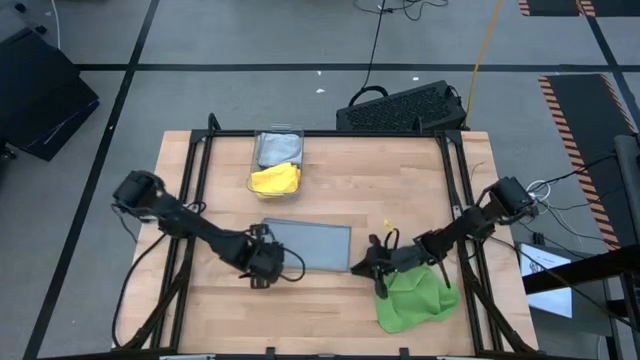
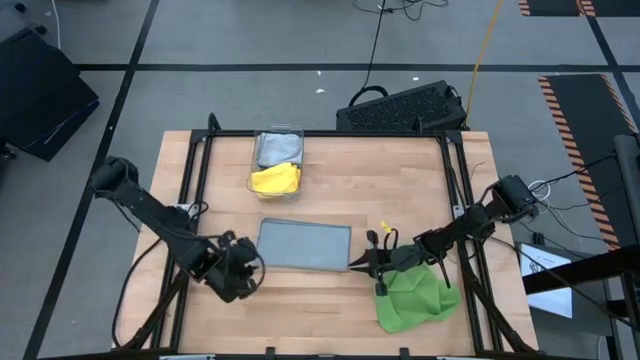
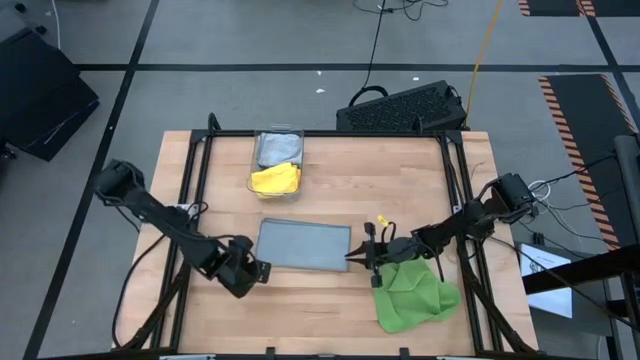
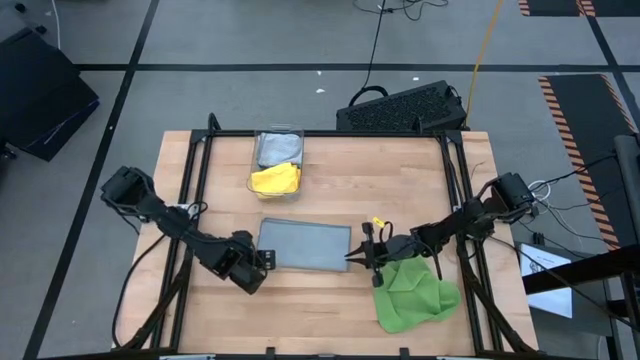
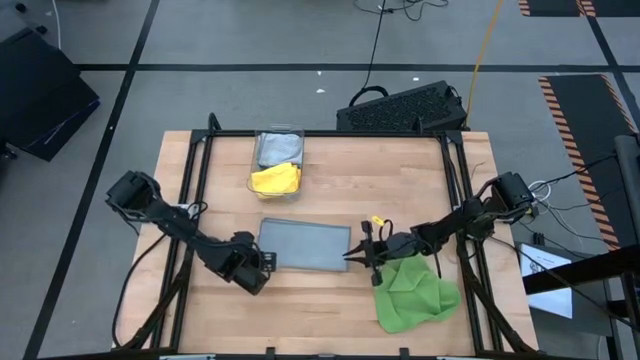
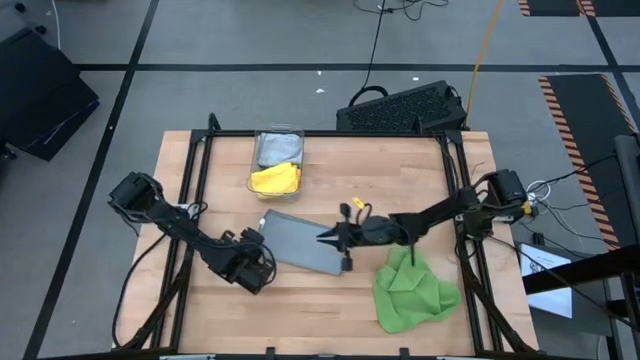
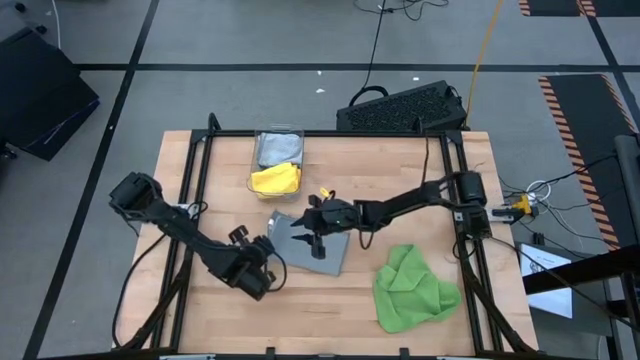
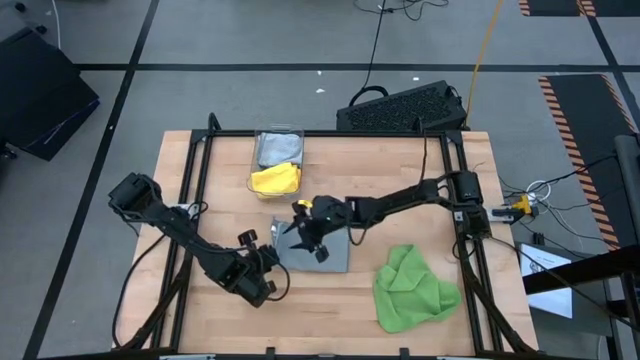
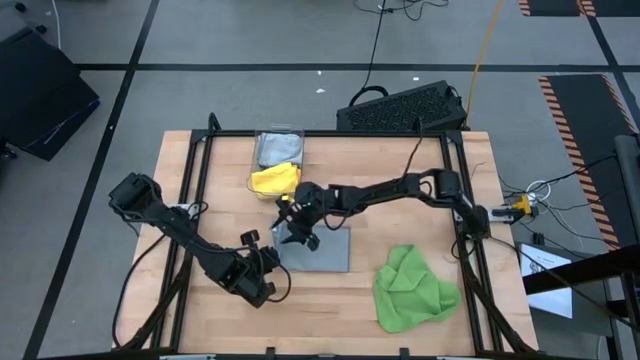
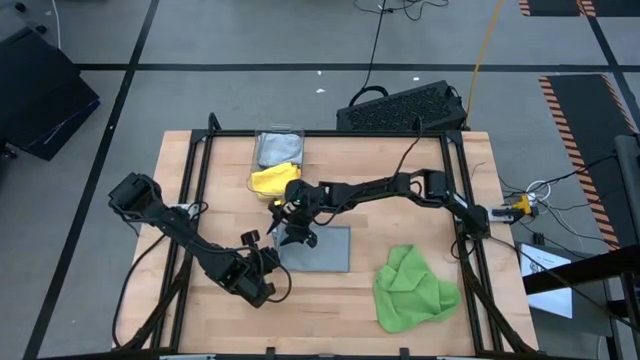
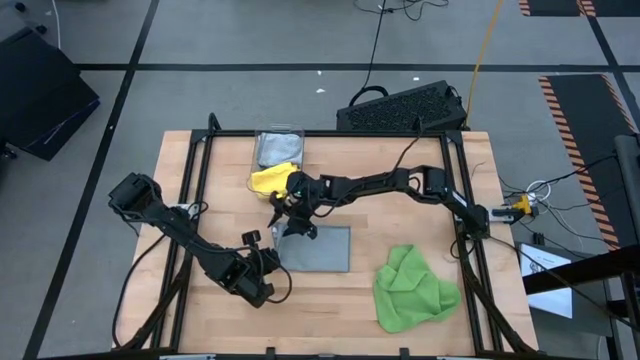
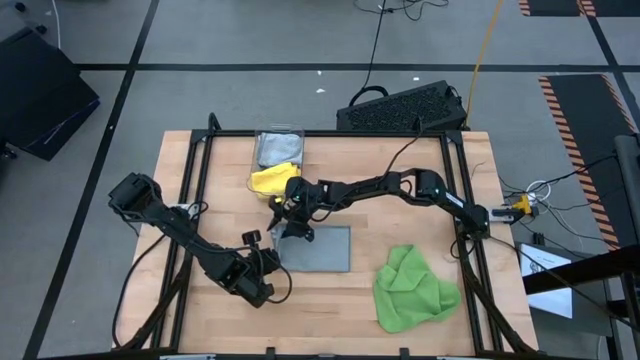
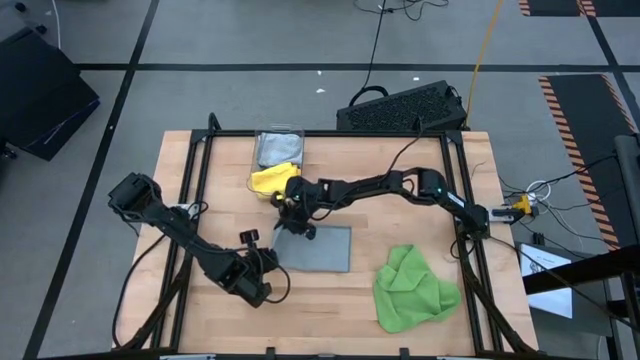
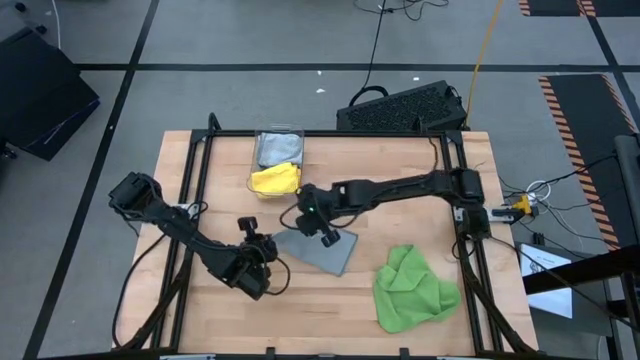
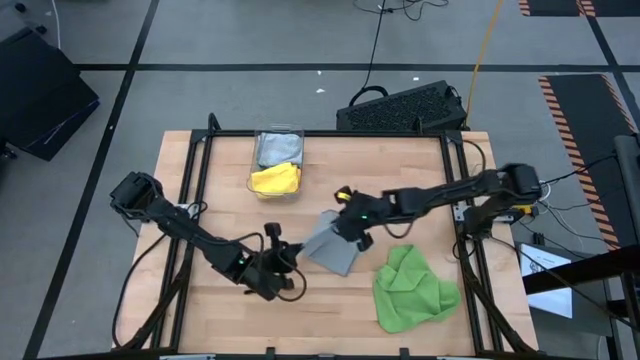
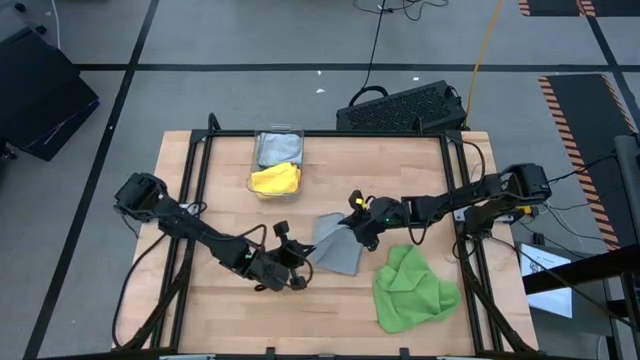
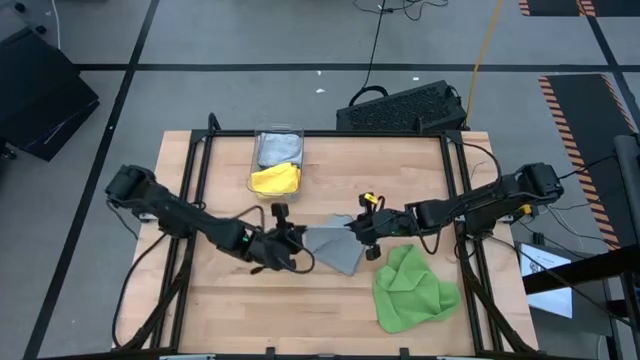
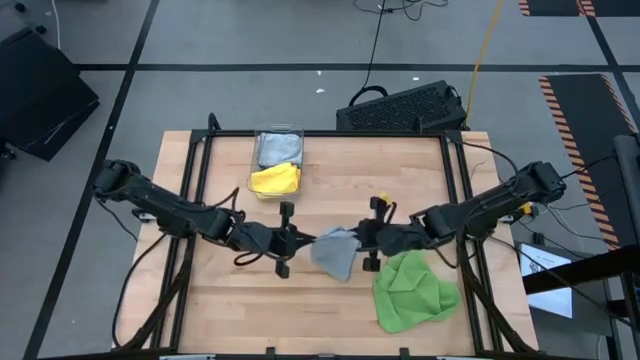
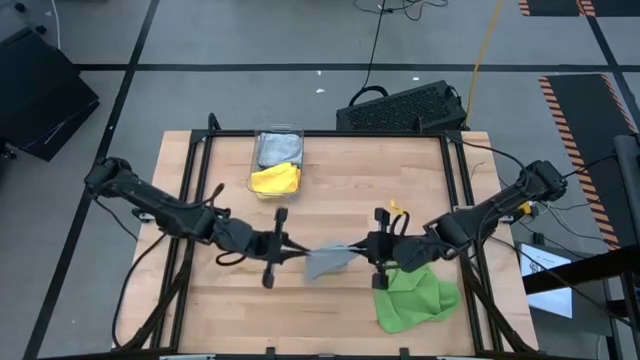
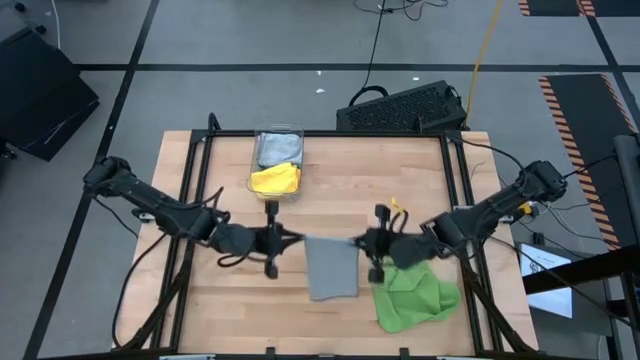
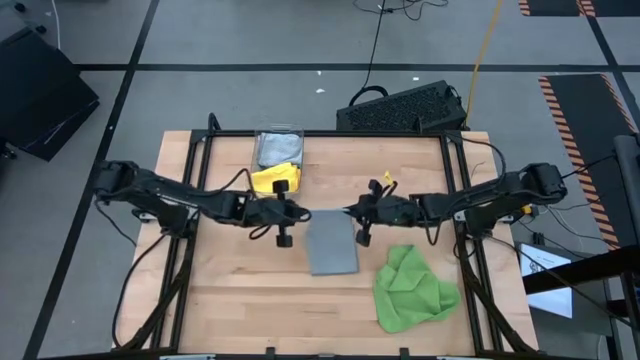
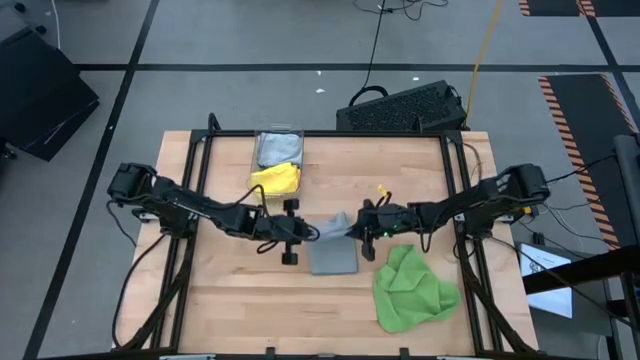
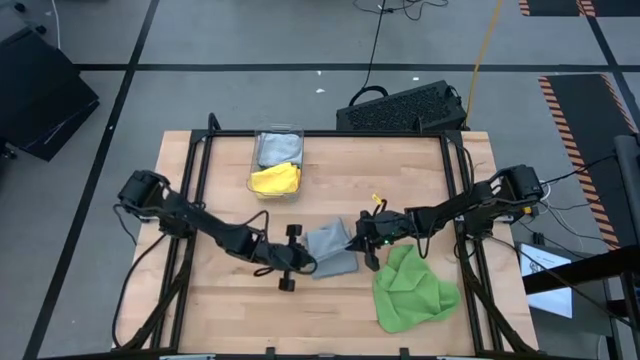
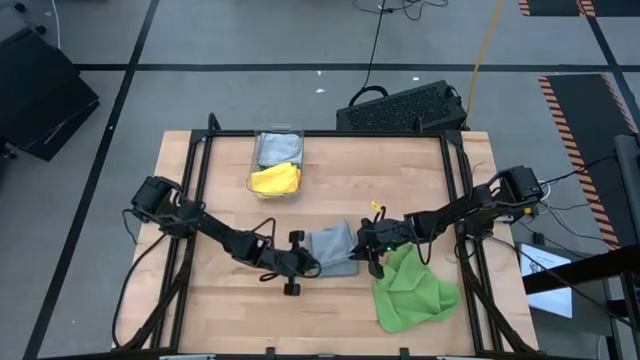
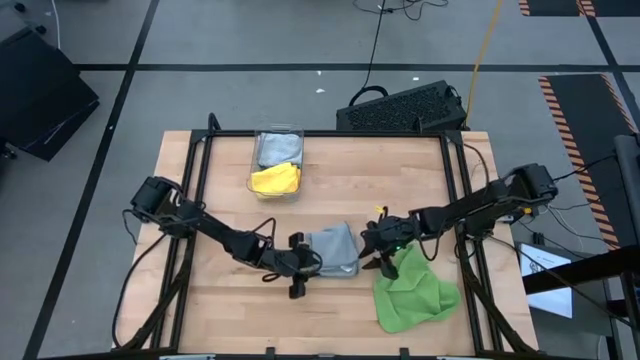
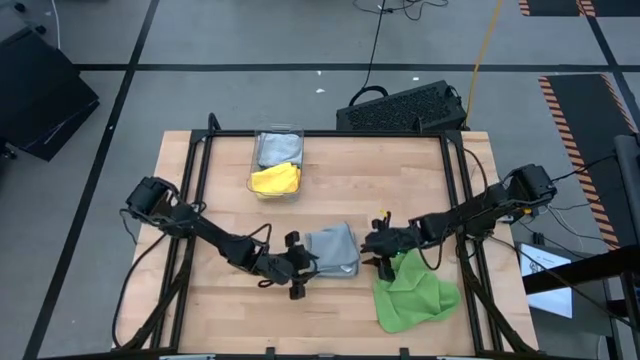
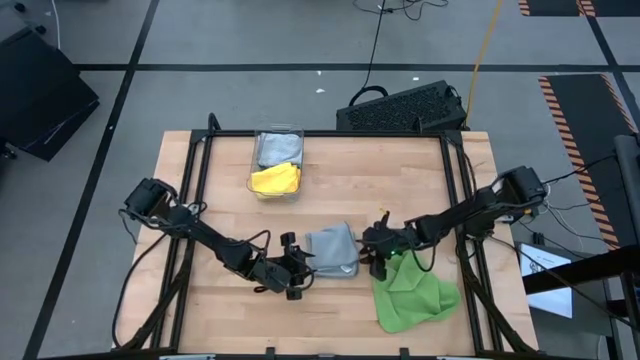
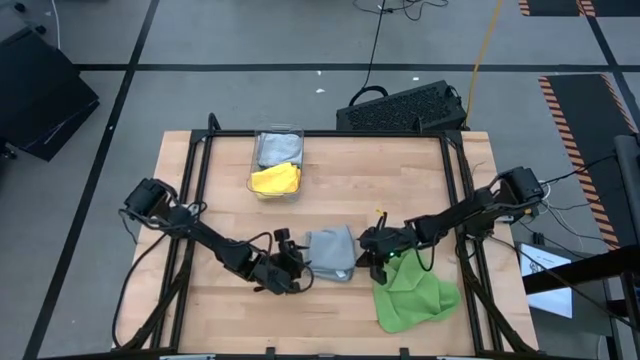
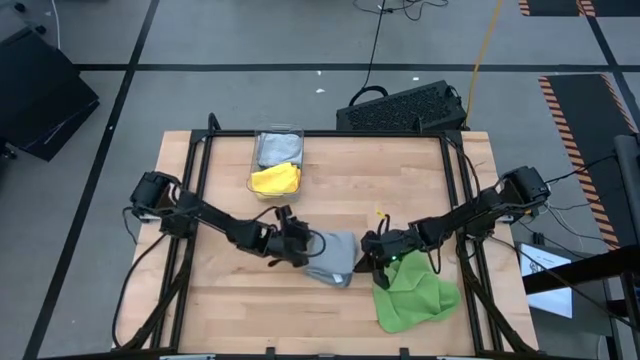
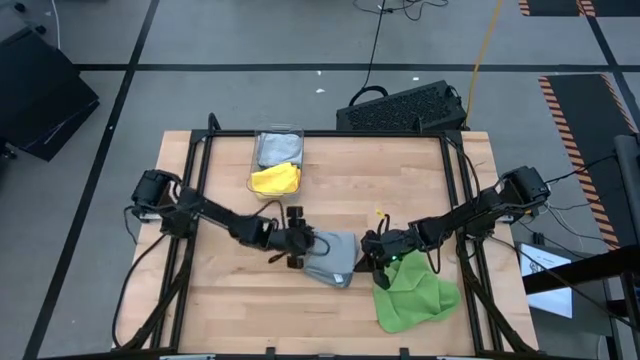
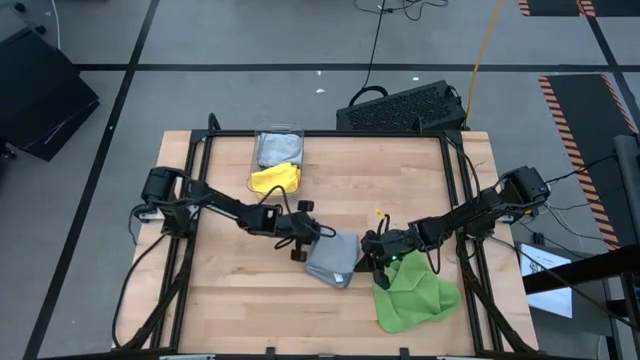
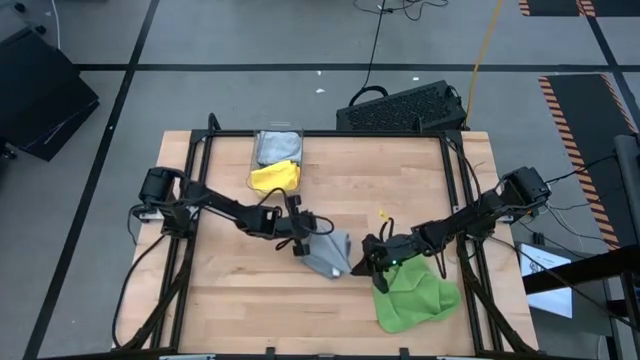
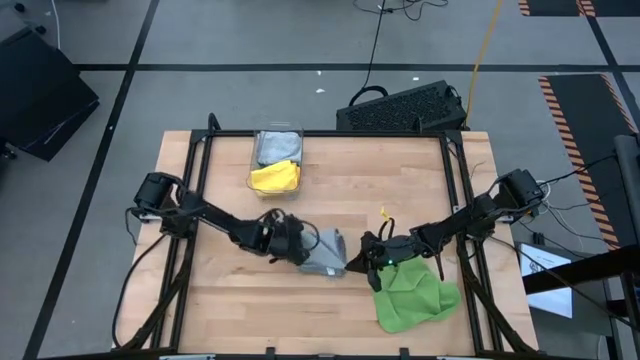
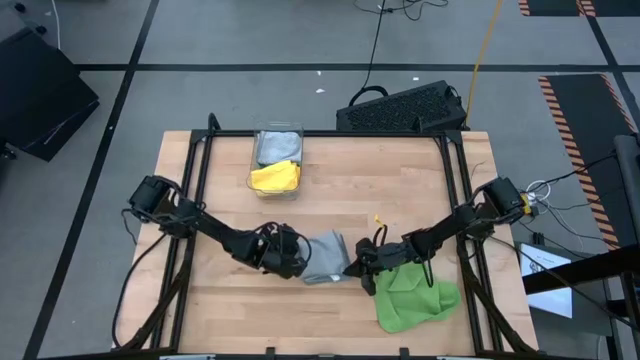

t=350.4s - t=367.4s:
Task: Fold microfiber towels
Fold the gray towel on the table

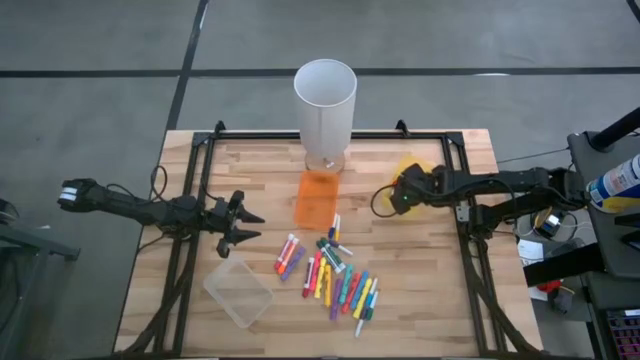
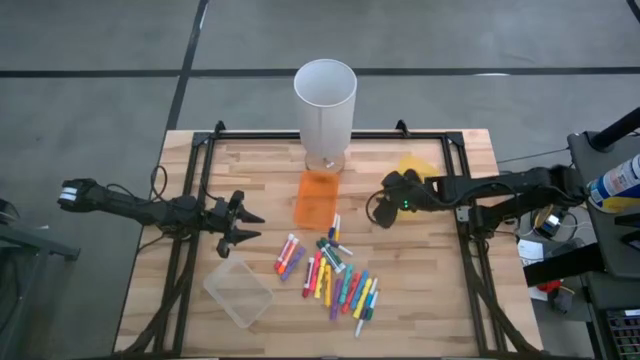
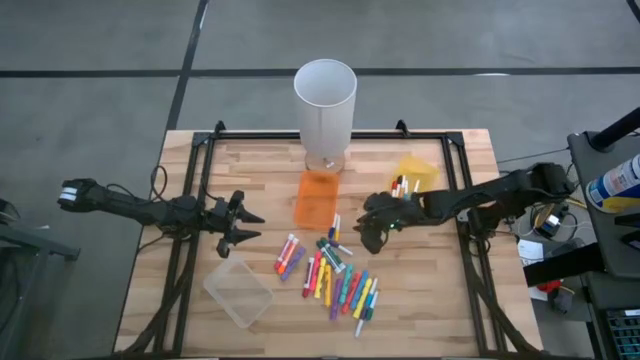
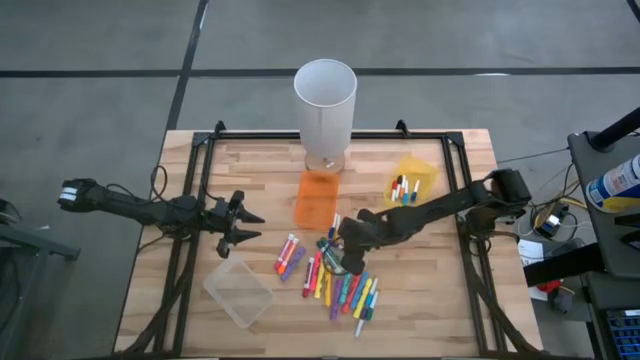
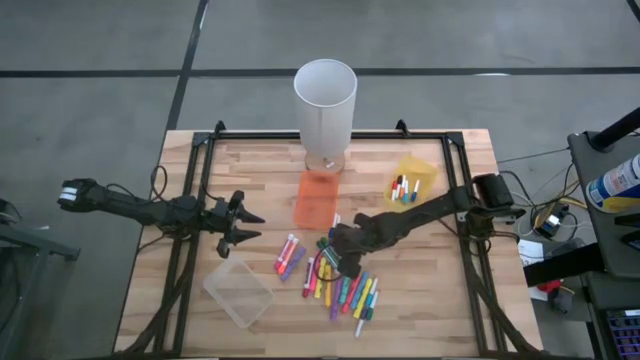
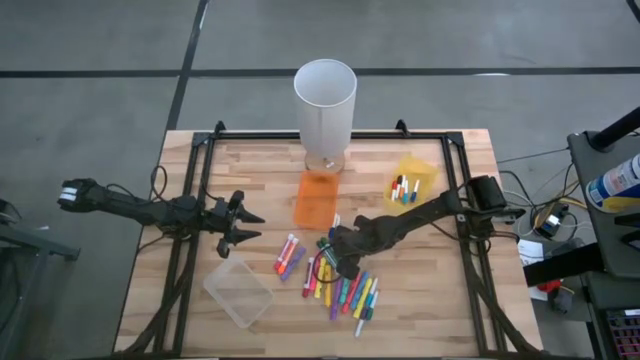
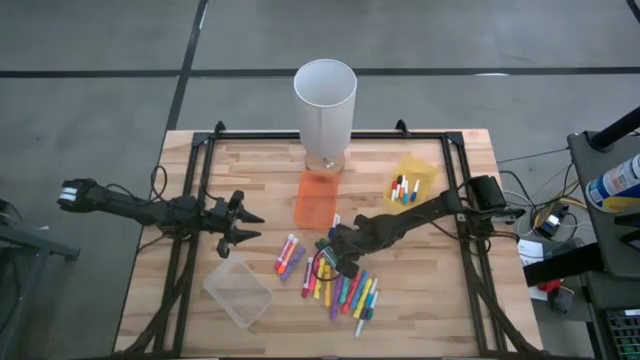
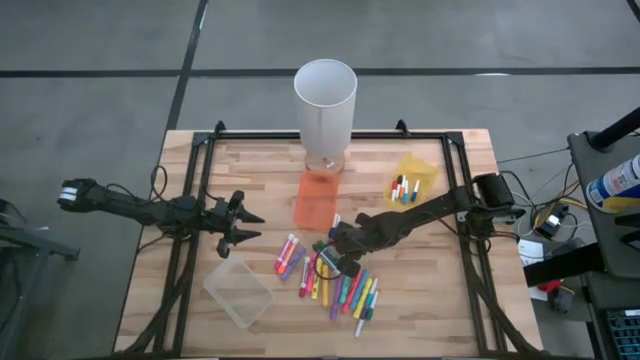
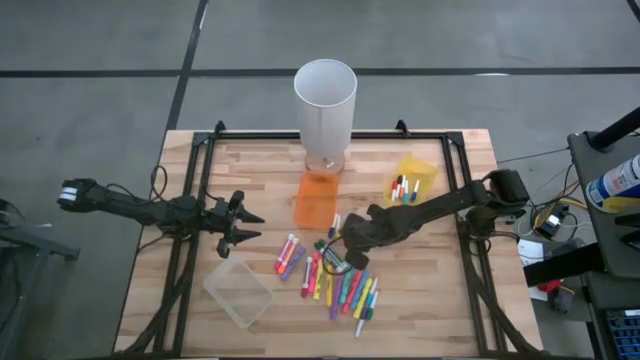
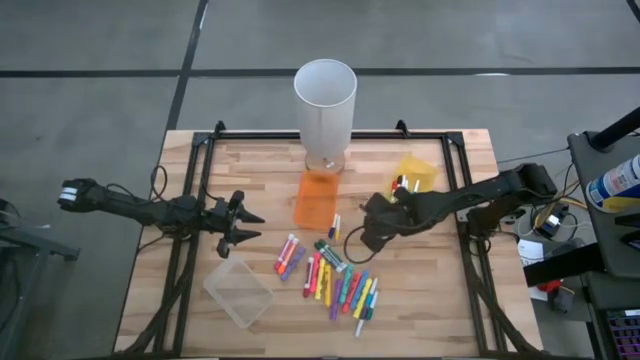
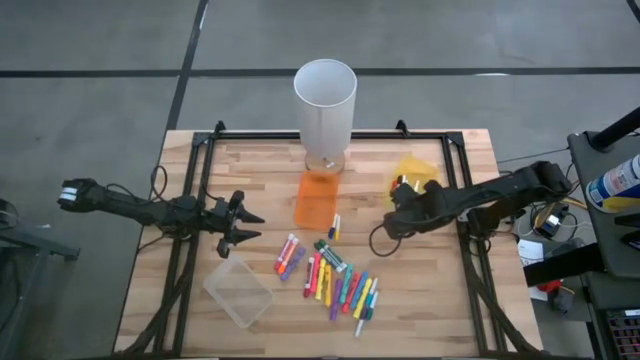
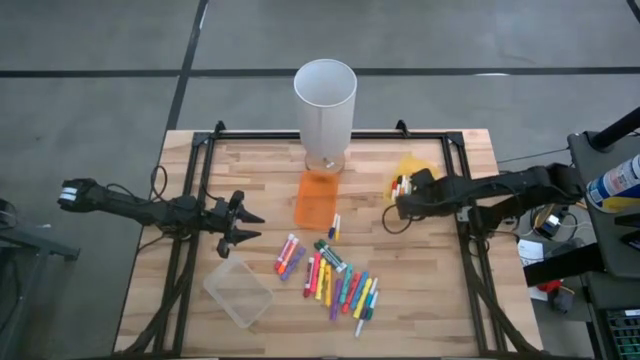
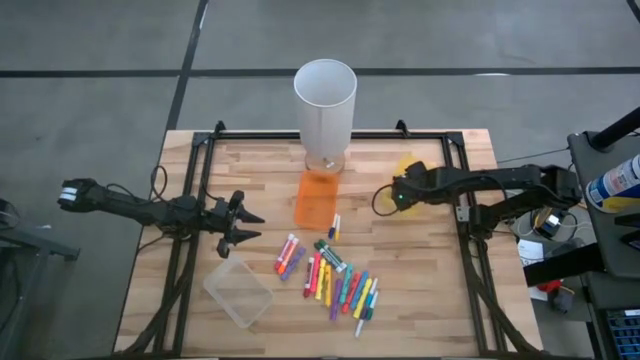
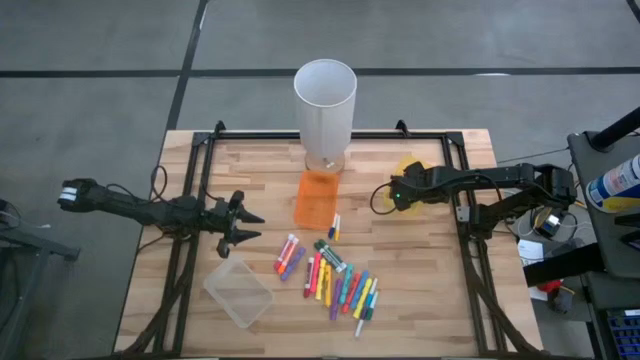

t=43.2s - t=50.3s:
Task: Pick & Place Markers
Put the top small purple marker pen into the yellow bin
